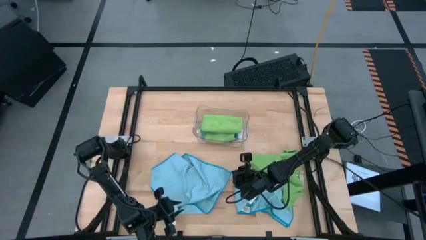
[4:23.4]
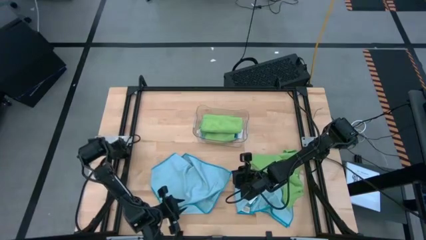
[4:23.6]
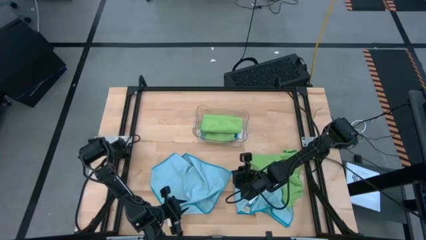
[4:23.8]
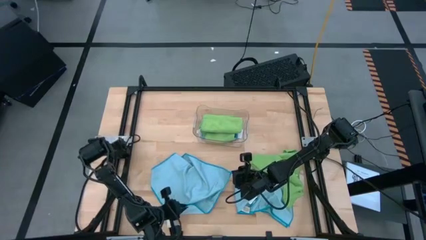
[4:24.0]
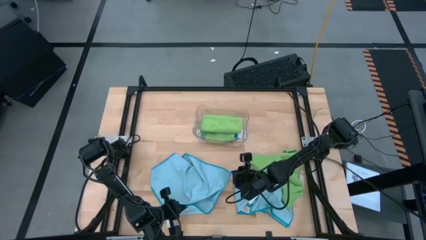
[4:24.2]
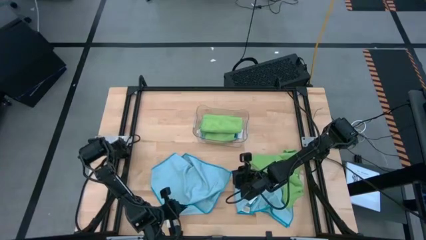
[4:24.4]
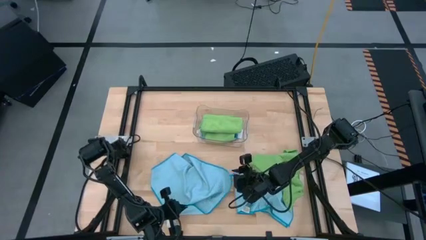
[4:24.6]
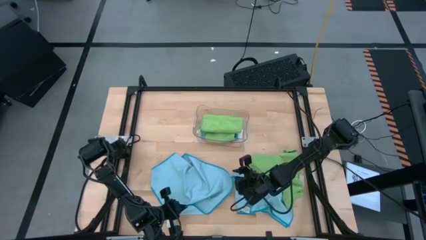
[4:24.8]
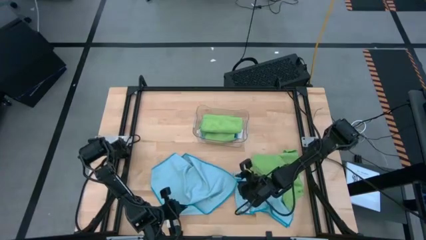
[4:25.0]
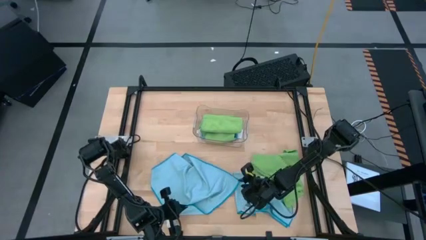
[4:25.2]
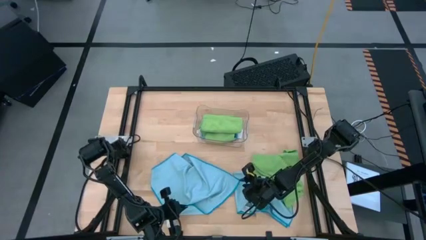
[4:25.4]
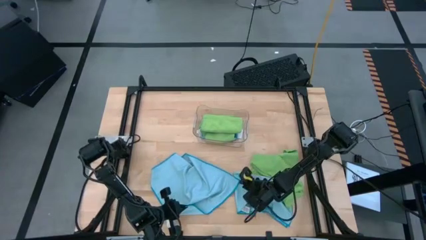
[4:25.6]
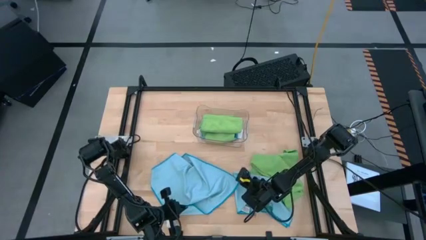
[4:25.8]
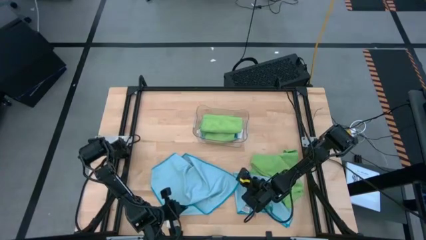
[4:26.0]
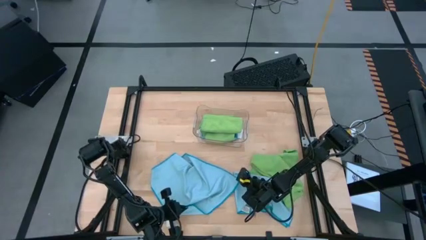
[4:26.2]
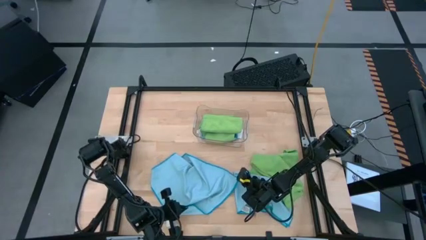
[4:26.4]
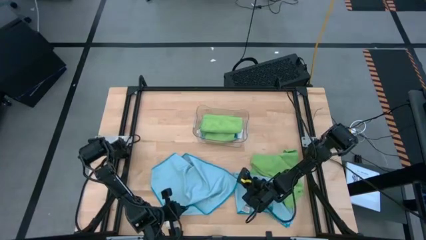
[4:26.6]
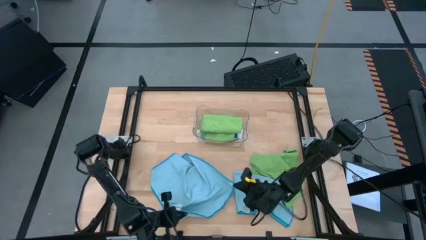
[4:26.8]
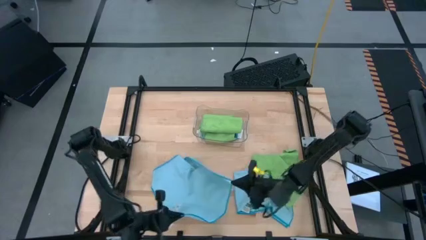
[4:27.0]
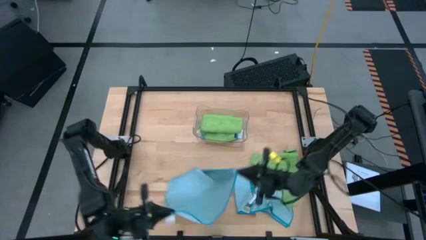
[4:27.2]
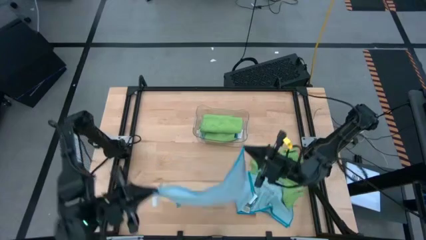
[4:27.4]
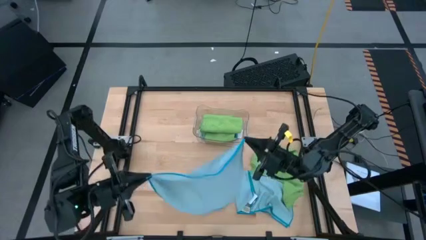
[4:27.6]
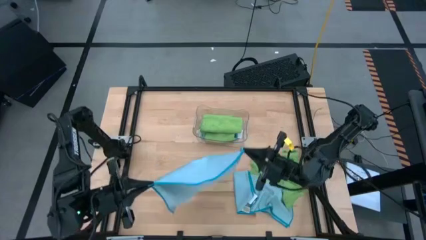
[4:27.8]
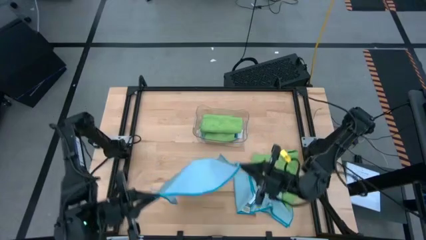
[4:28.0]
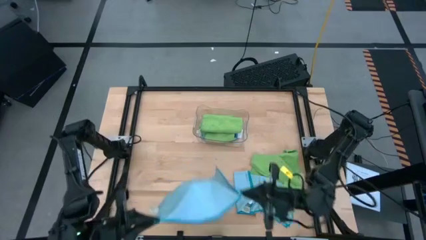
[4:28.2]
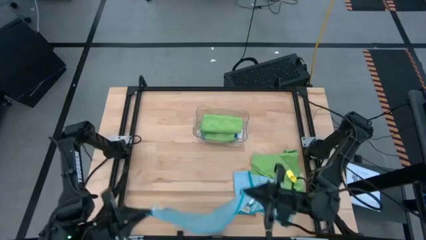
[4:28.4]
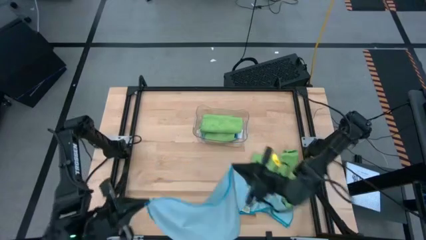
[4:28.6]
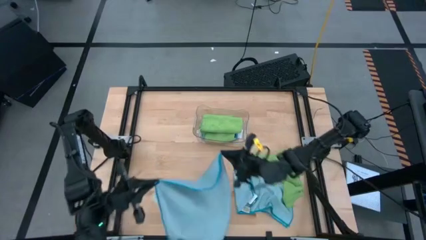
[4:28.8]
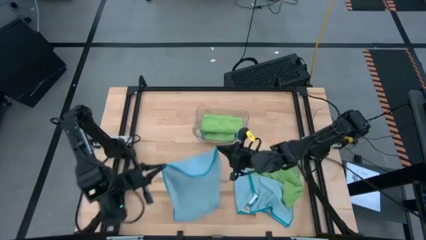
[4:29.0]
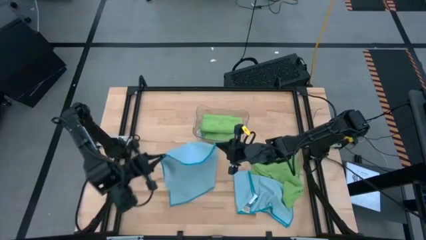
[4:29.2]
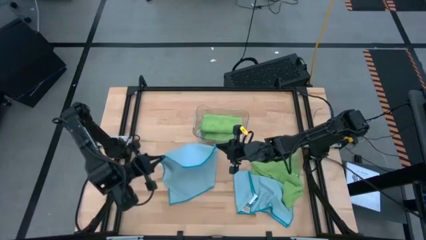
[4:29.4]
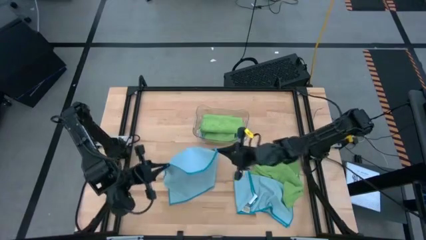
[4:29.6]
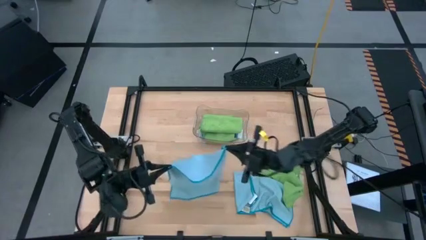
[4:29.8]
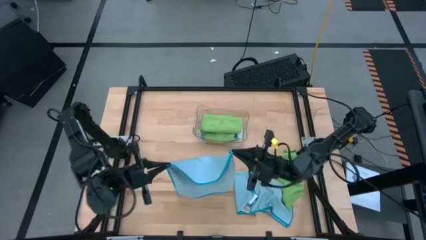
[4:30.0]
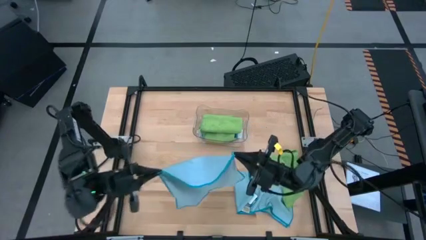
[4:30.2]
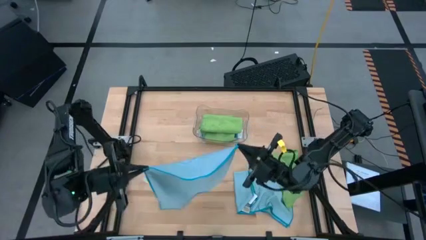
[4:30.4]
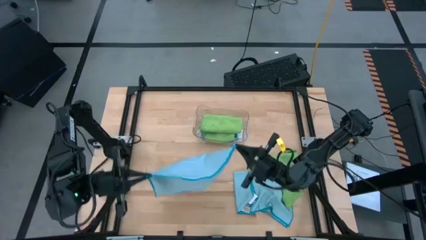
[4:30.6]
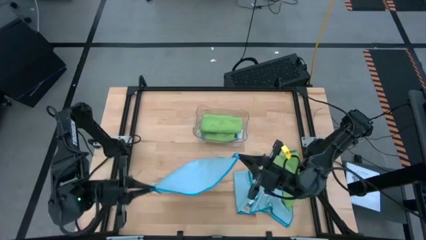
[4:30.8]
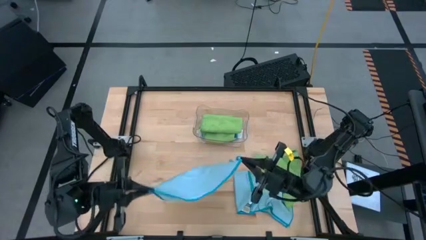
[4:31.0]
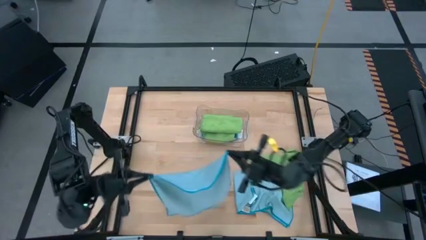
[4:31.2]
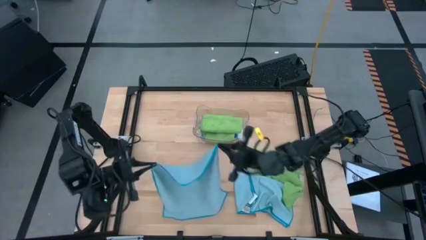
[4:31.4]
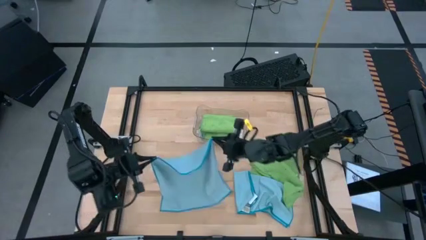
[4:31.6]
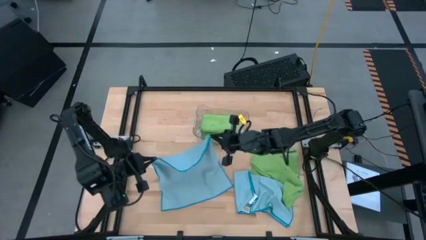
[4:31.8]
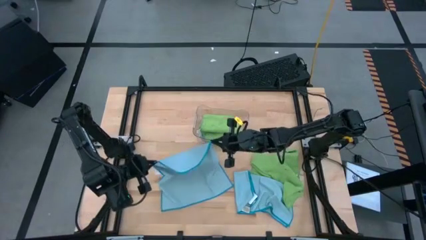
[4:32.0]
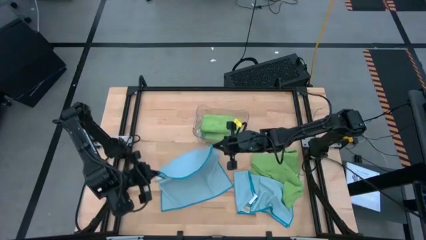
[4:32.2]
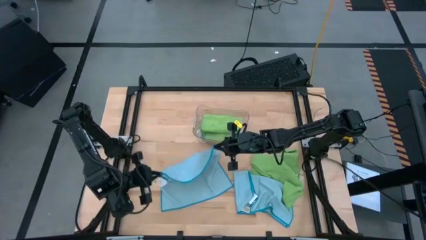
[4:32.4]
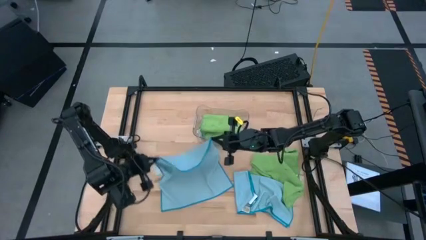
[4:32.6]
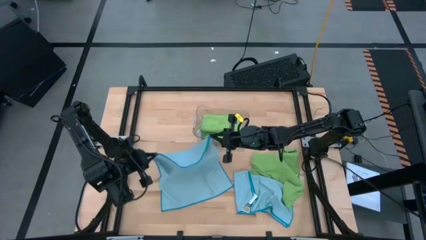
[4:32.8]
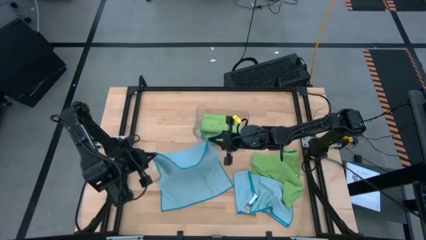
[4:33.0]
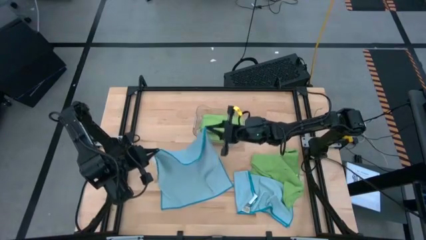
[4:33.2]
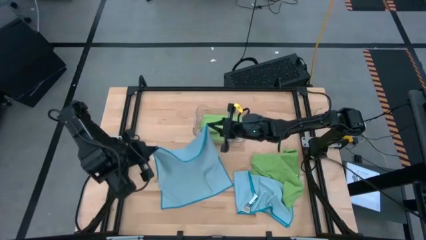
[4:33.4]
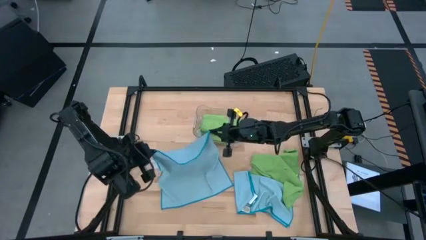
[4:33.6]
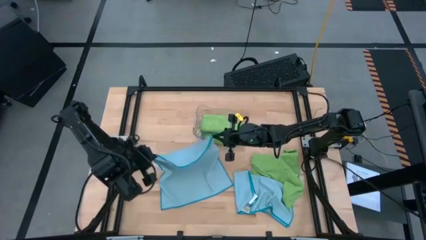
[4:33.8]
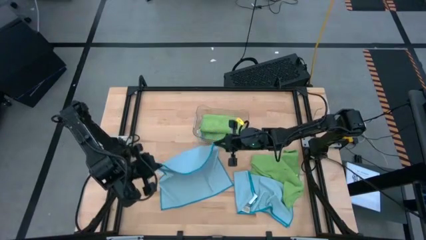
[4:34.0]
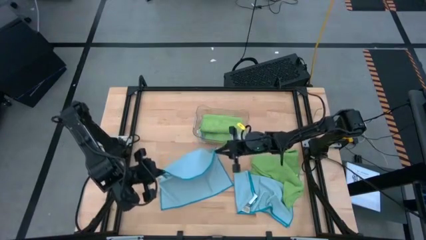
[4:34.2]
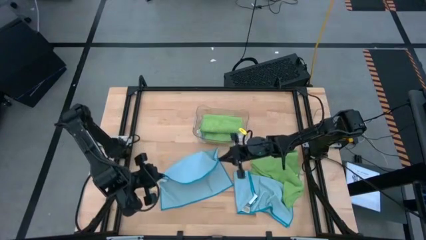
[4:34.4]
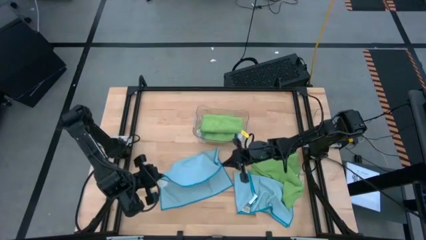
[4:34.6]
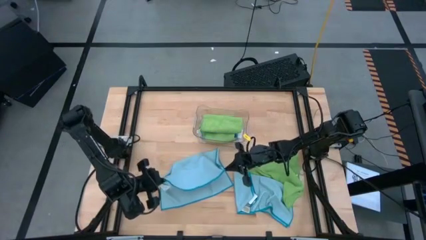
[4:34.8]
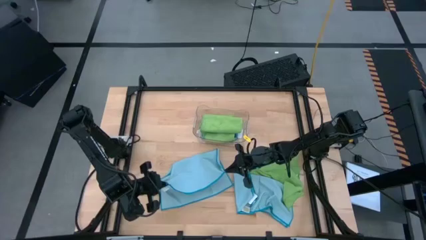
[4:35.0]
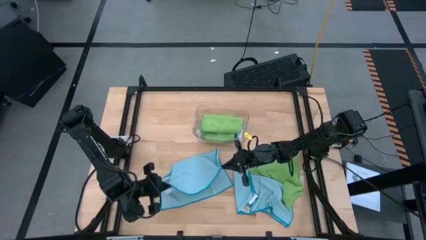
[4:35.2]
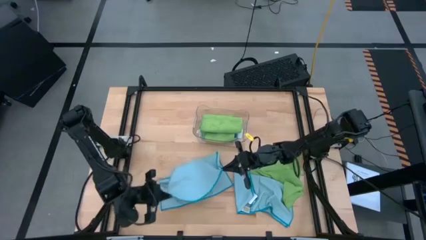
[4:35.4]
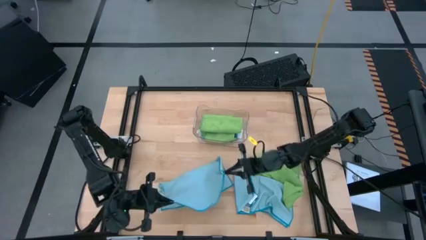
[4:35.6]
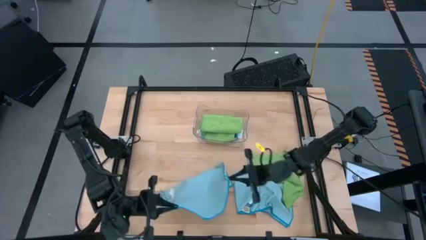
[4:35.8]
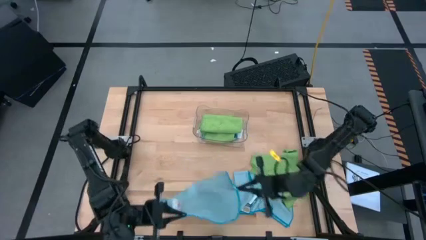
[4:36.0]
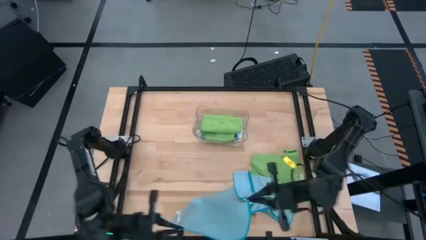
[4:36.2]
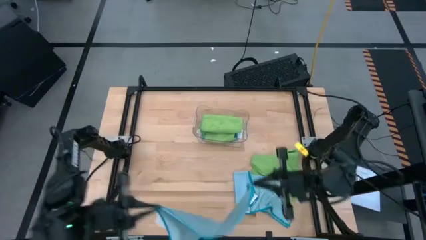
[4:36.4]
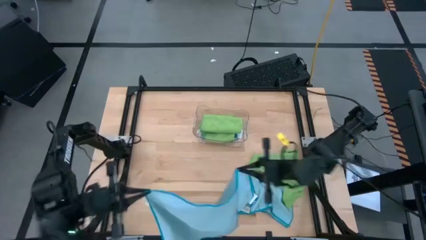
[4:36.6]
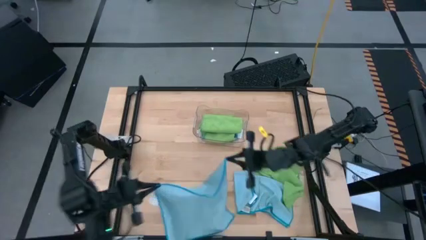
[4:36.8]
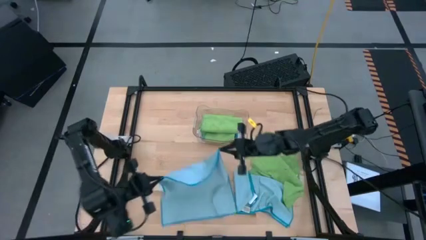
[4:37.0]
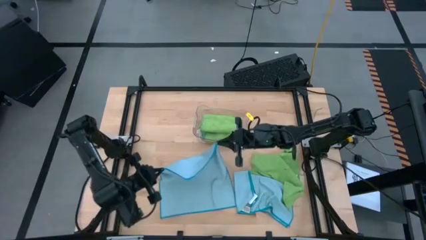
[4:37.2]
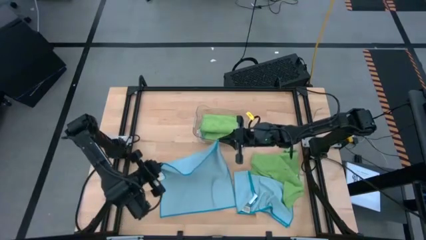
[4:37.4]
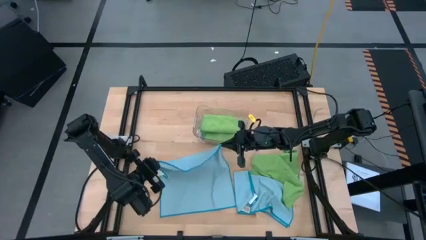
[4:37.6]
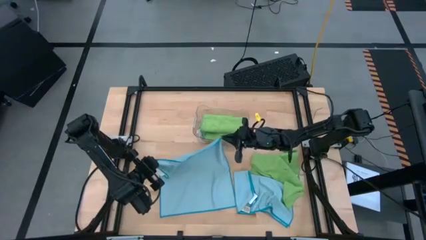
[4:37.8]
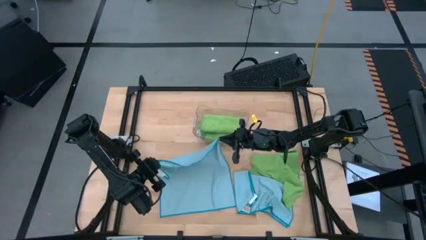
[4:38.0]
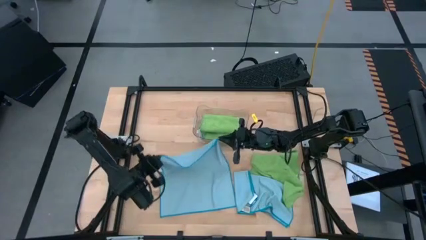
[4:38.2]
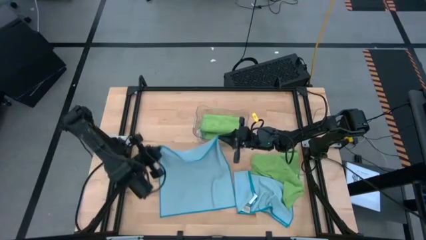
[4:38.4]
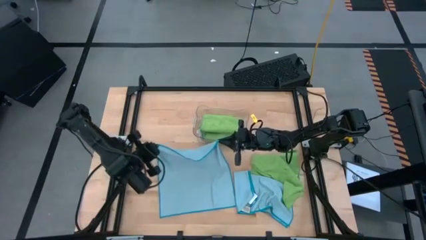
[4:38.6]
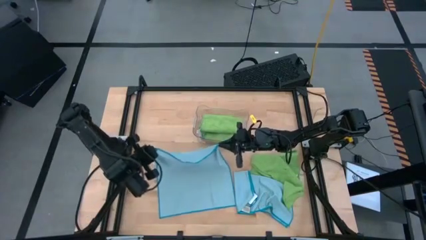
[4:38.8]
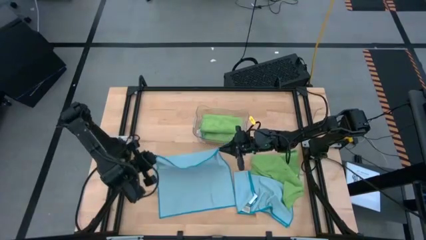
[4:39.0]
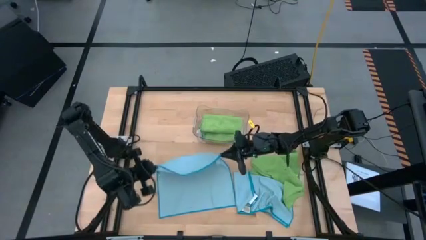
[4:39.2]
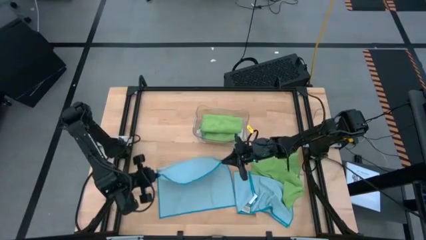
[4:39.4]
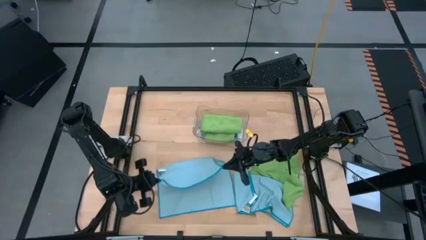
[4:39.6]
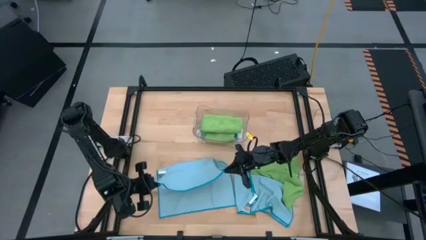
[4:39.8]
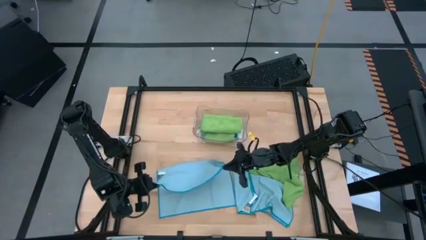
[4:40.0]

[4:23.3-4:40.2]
Task: Fold microfiber towels
Fold the blue left microfiber cloth
